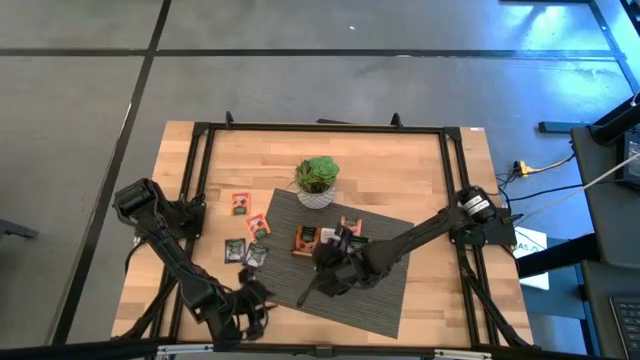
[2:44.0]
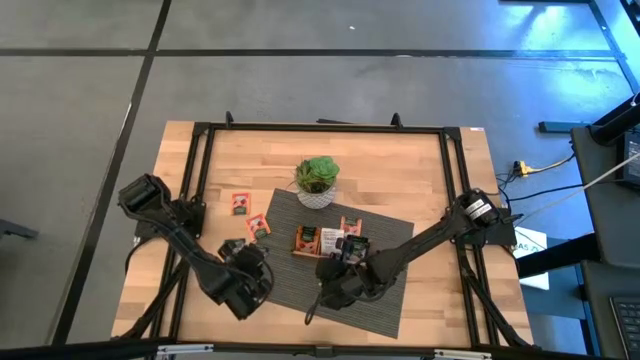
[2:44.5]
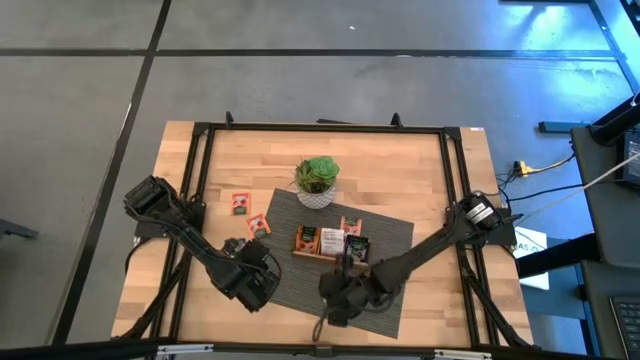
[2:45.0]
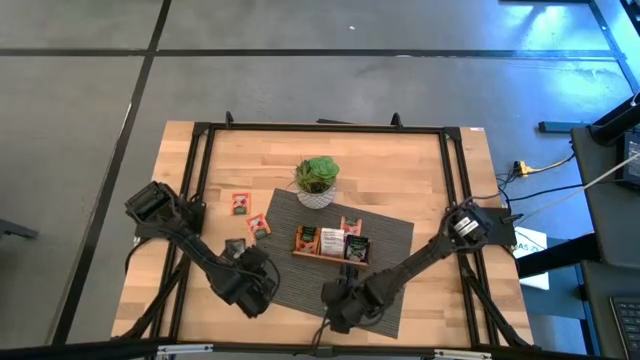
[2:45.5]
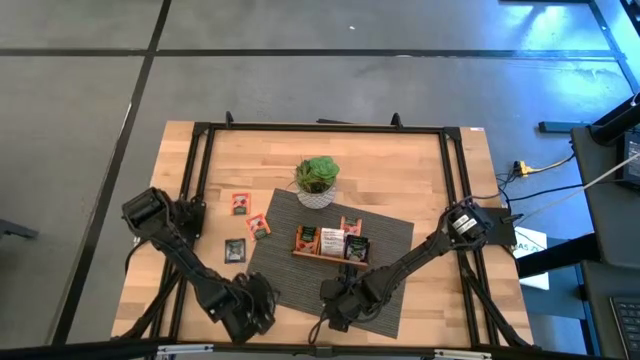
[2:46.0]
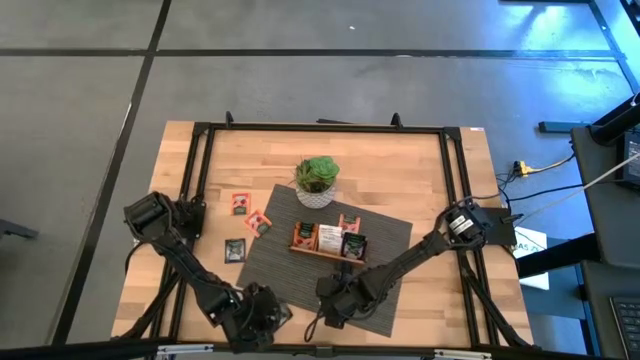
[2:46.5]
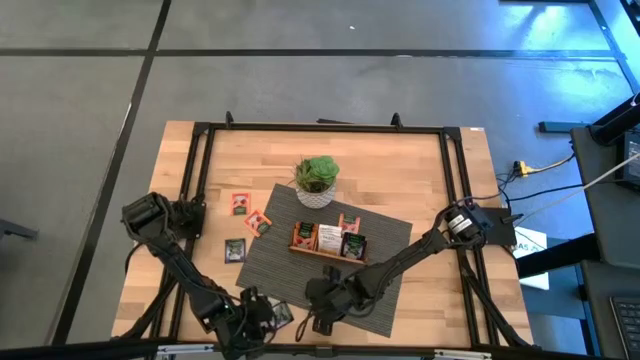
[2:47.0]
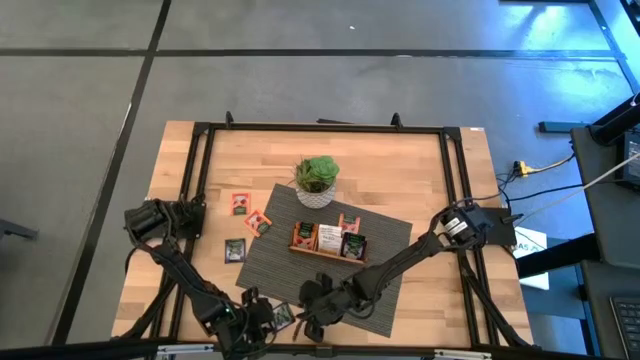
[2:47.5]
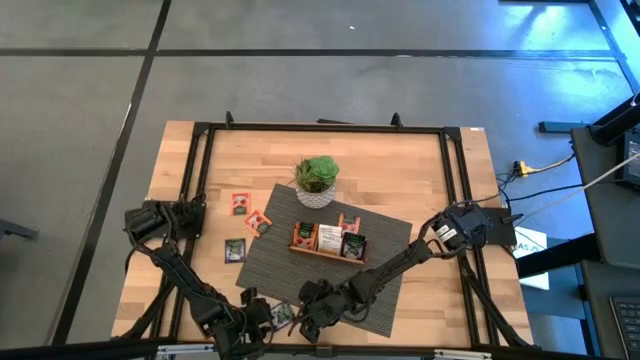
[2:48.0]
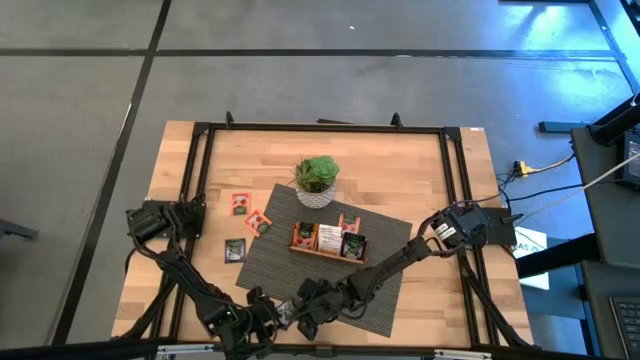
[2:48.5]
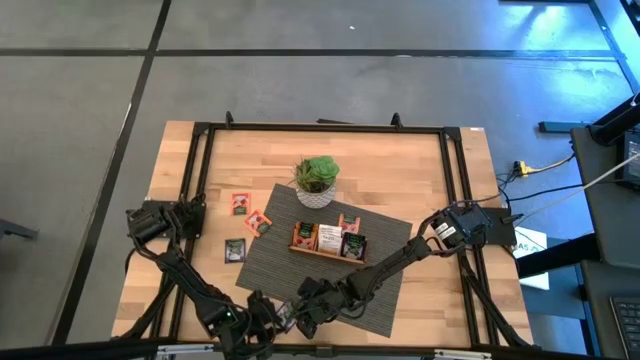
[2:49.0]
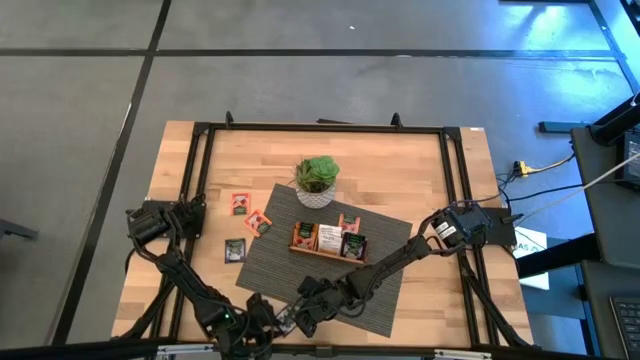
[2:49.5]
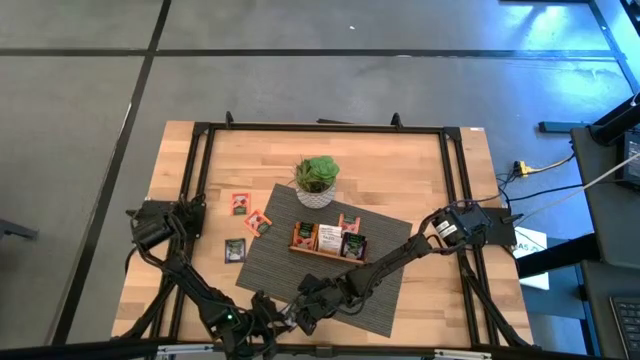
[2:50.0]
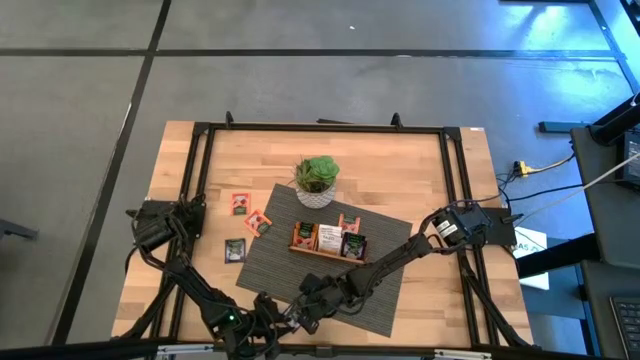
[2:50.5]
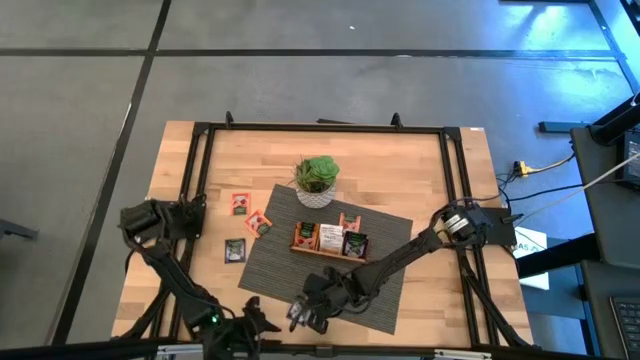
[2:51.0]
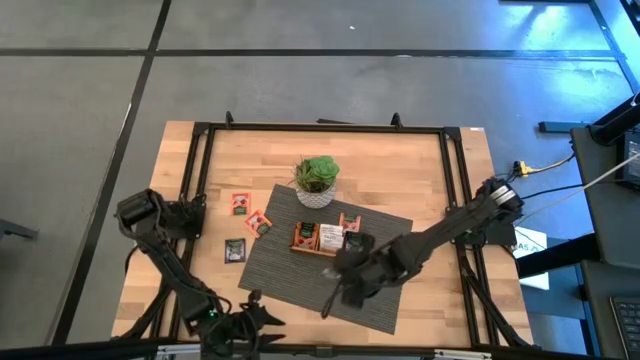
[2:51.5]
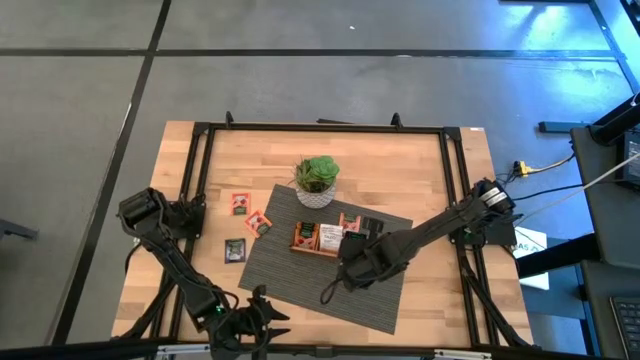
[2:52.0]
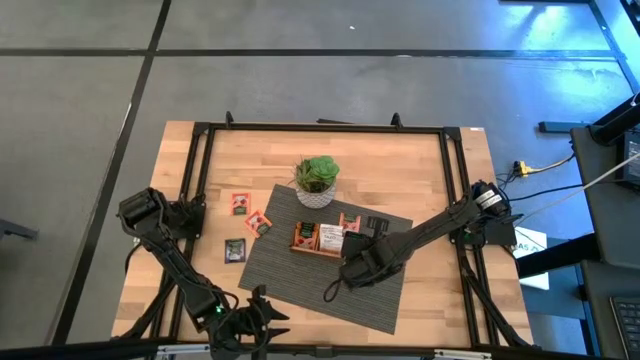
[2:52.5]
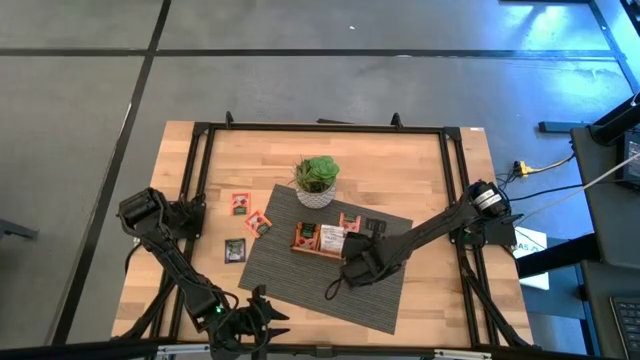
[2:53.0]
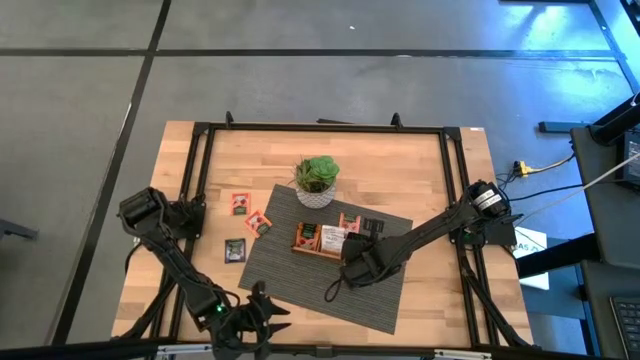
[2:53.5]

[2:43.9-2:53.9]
Task: Pick & Place Tea
Put the violet tea bag into the right section of the wooden organizer

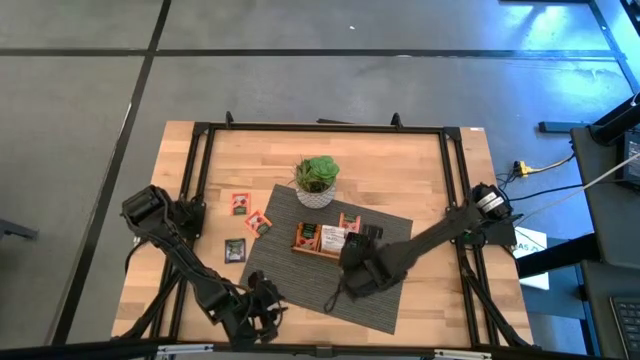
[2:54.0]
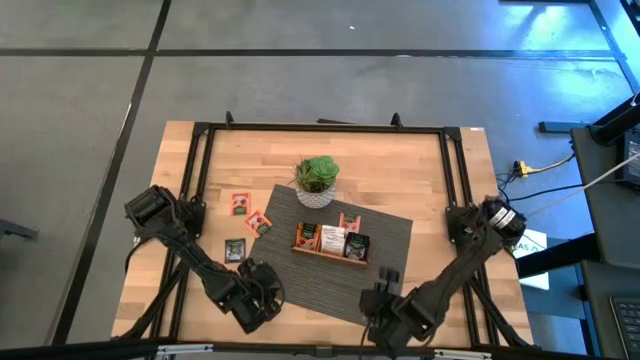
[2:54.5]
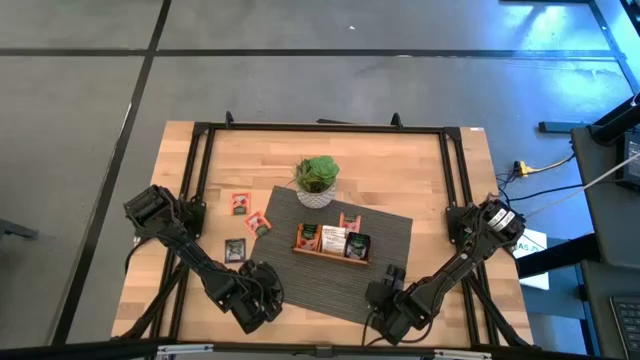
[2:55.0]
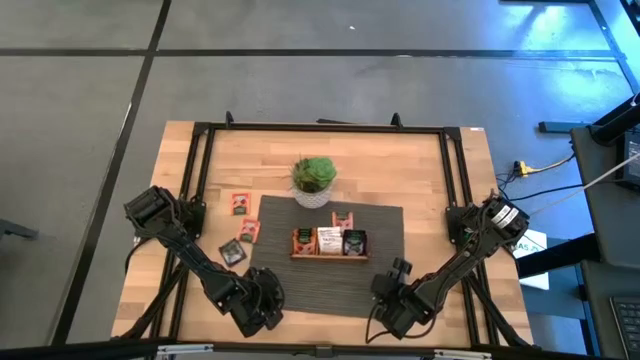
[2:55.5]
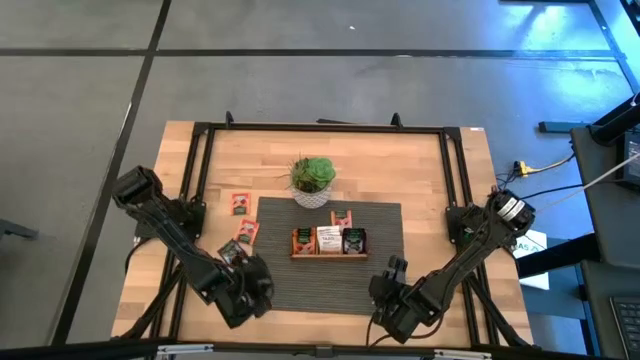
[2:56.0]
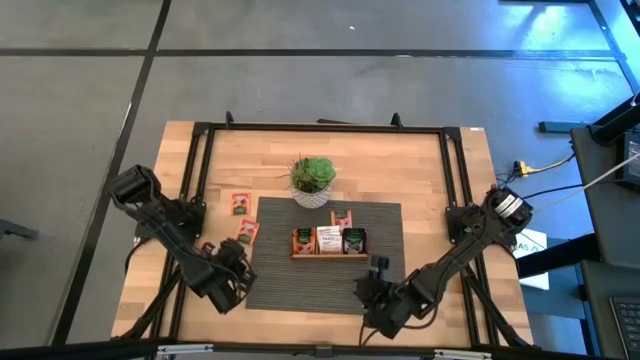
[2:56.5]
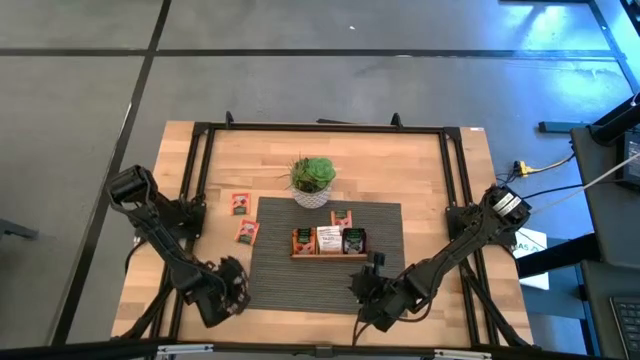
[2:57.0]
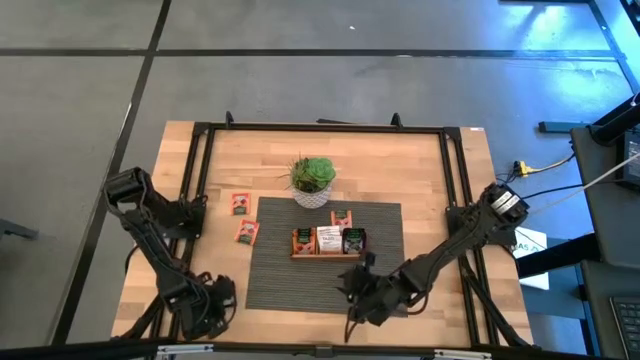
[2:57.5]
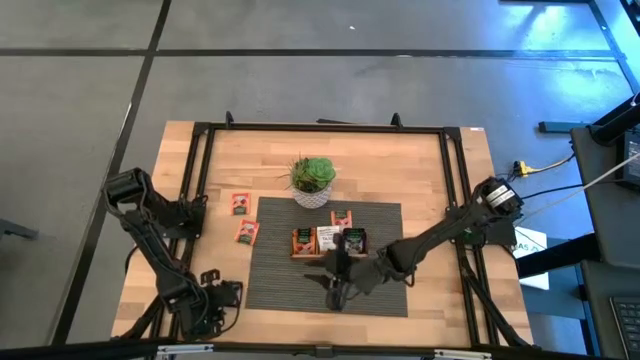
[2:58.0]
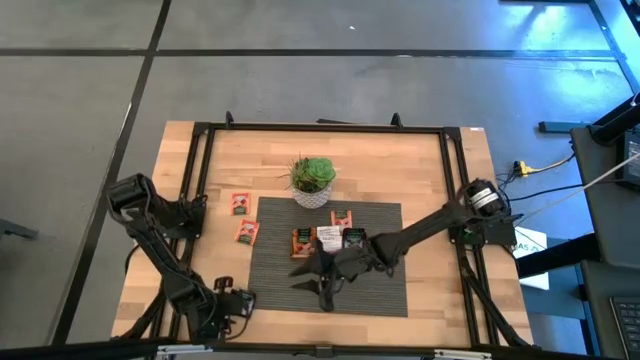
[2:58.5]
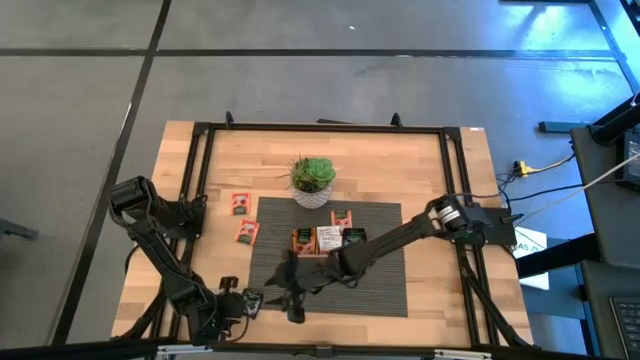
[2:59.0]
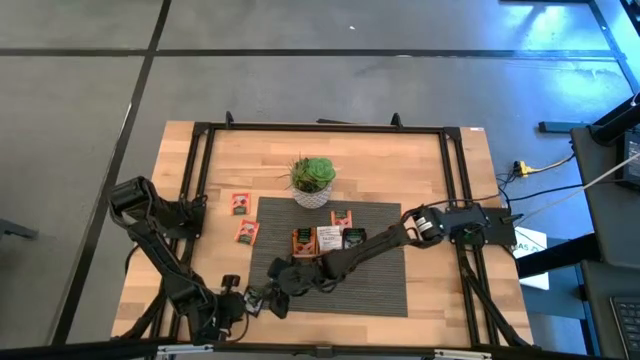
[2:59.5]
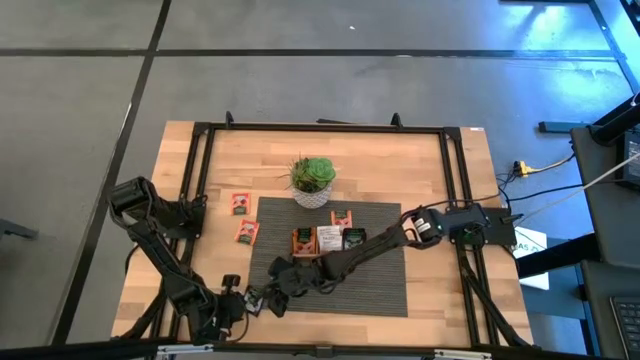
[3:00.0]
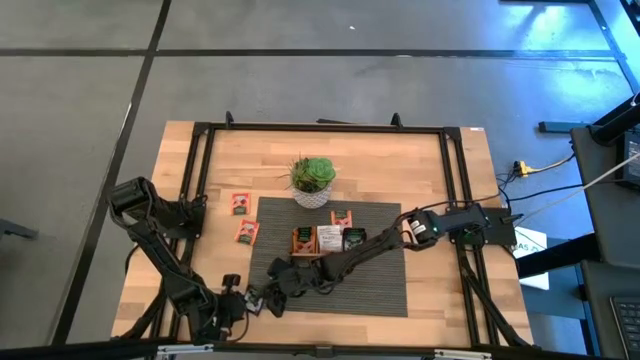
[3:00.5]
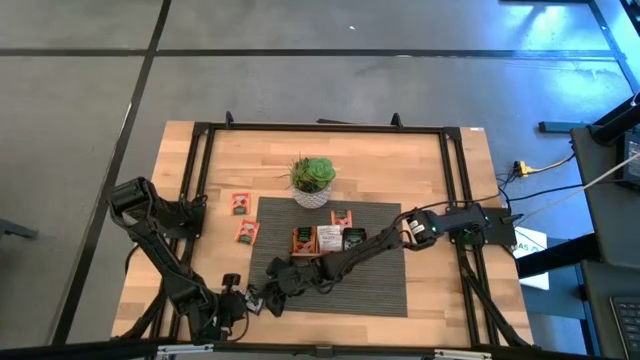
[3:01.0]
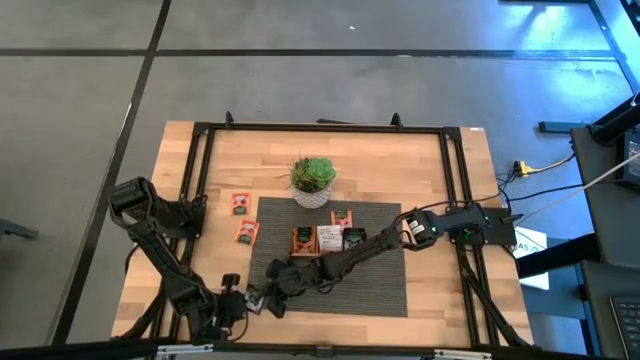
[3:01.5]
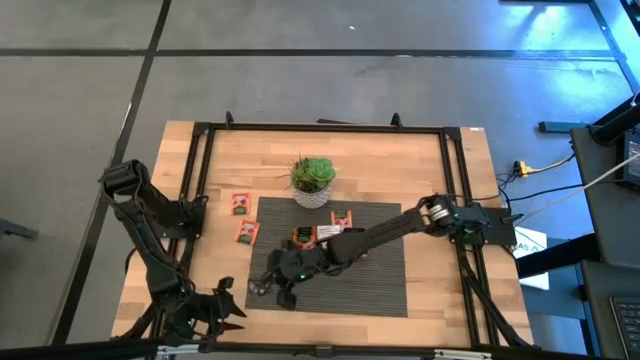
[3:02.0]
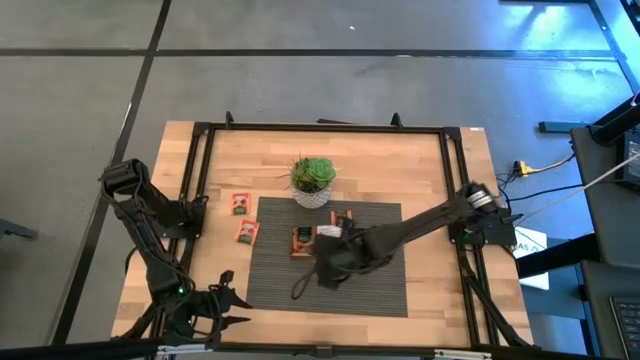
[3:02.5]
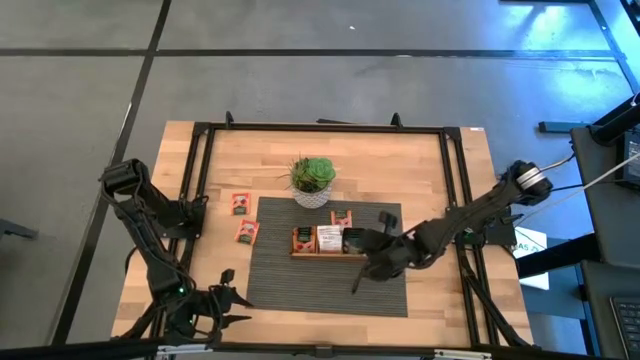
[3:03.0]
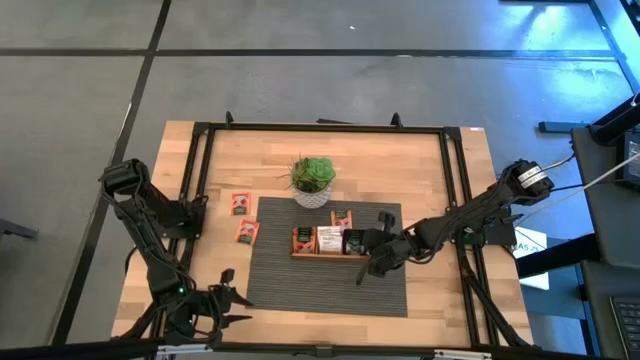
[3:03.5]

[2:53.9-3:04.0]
Put the violet tea bag into the right section of the wooden organizer
